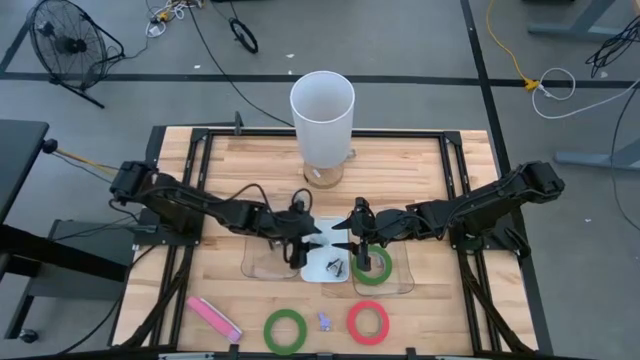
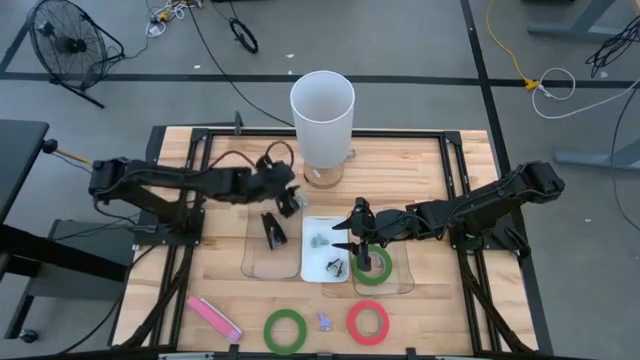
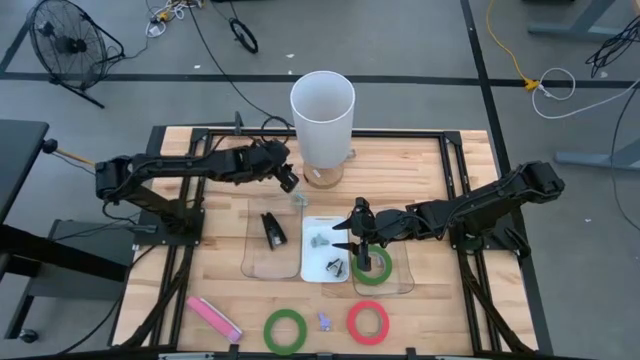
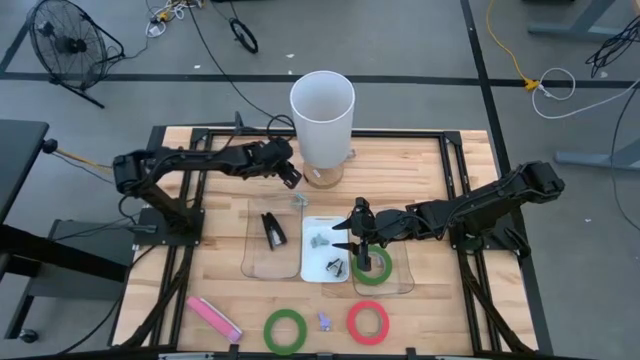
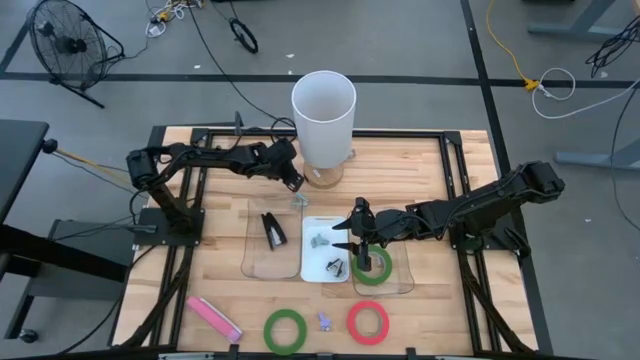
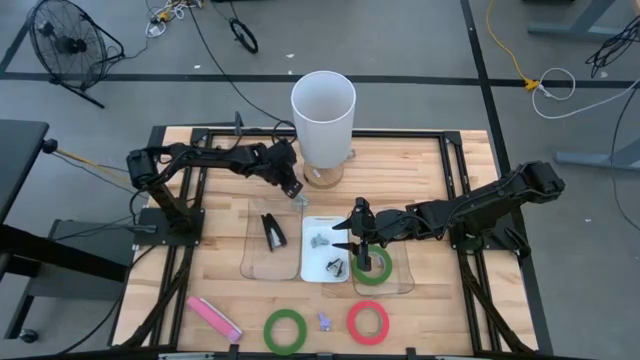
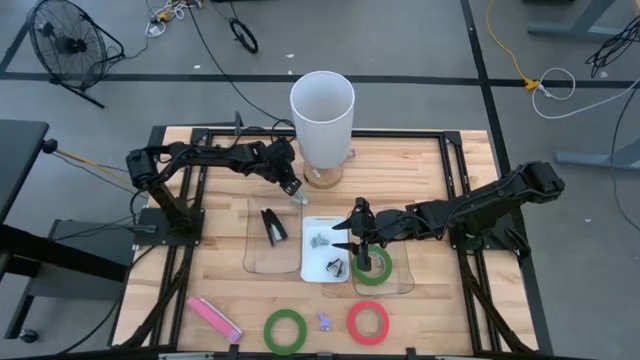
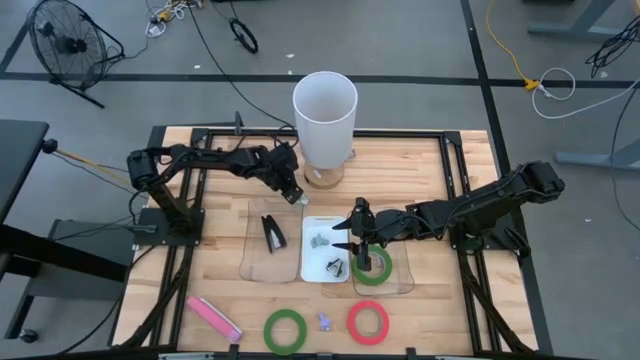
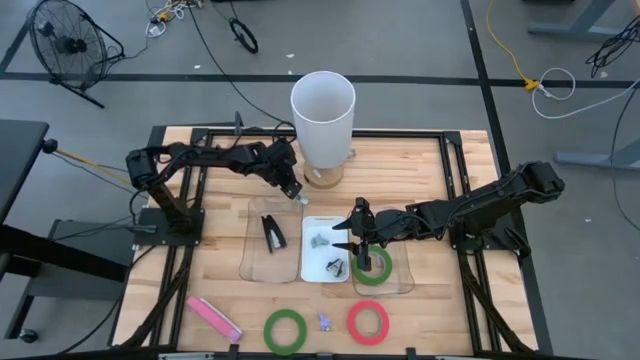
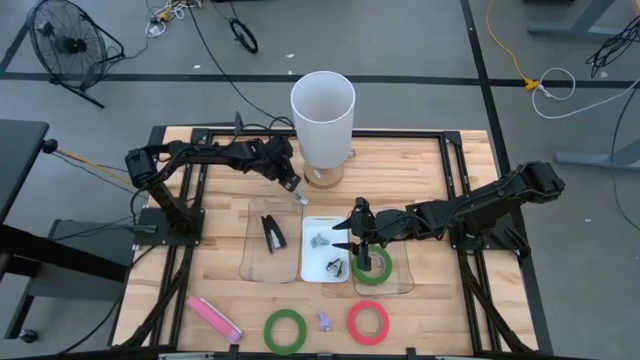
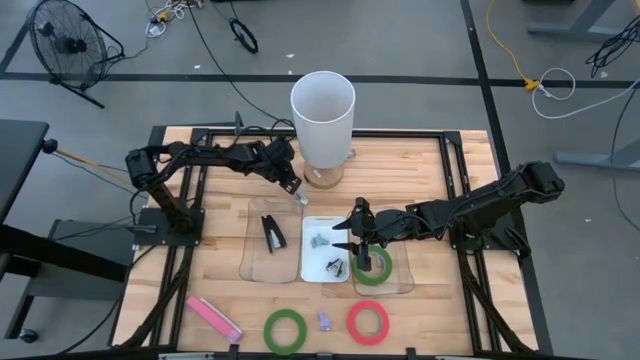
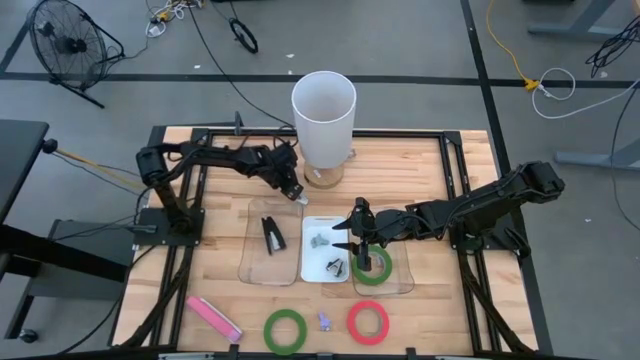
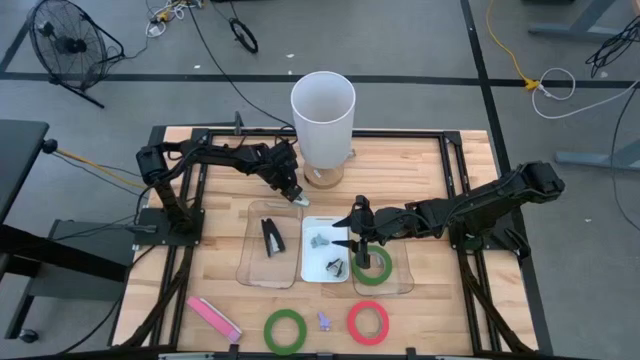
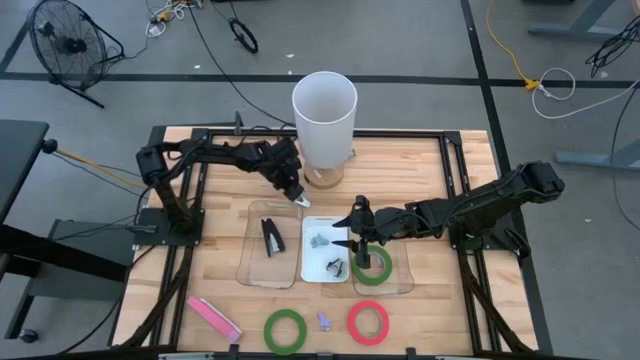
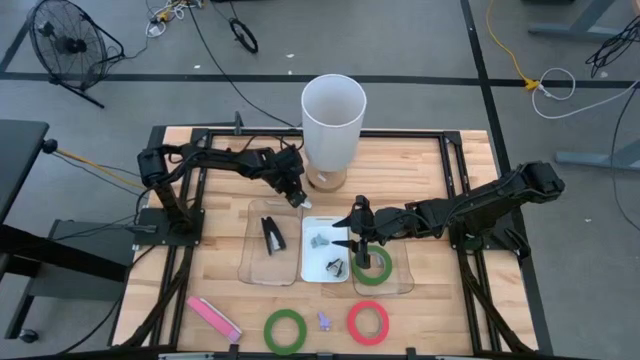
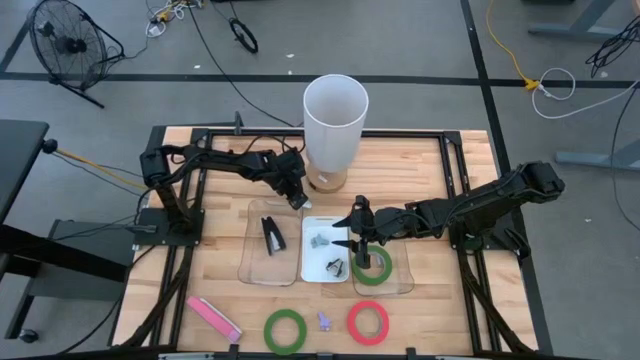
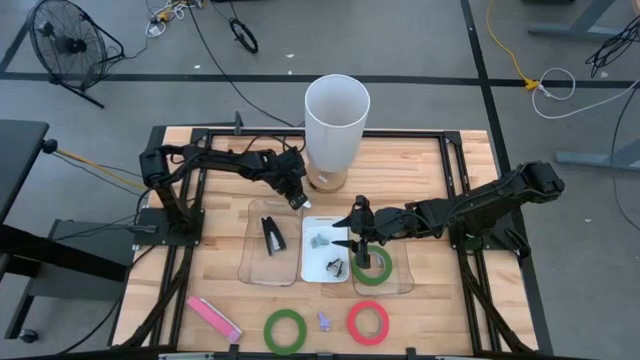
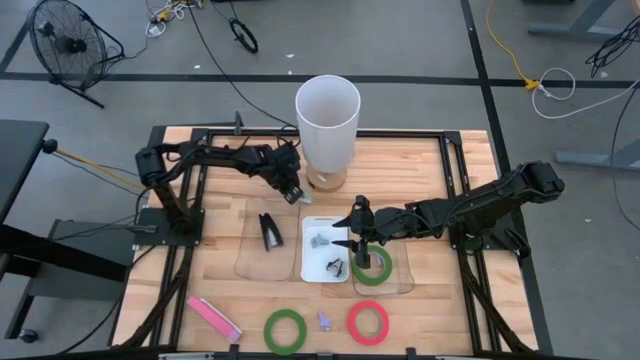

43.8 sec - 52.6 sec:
Task: Pick and place Stapler, Stapler remover, tape
Put the light blue staple remover into the white bin

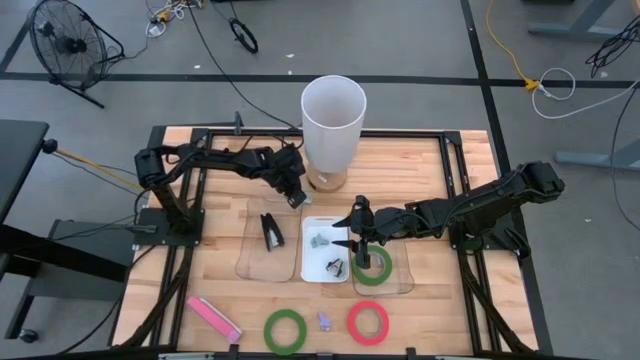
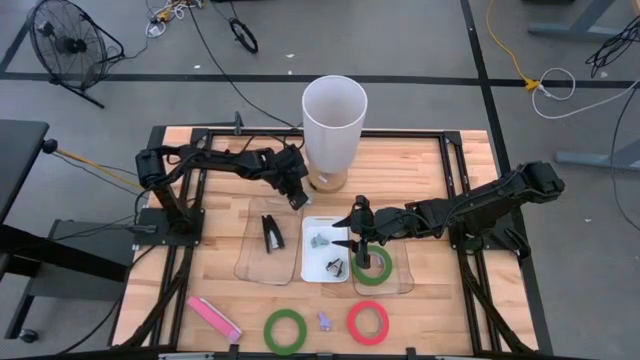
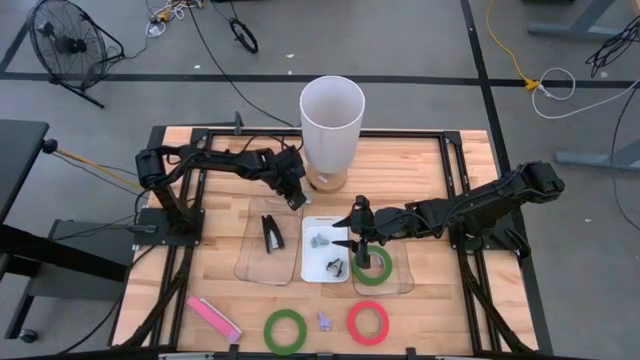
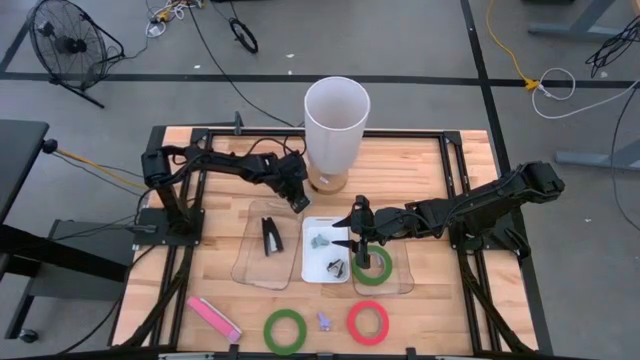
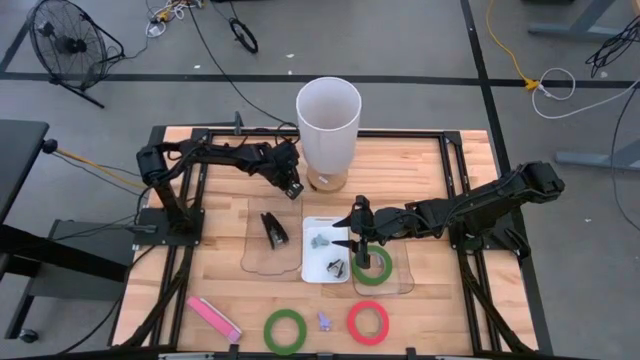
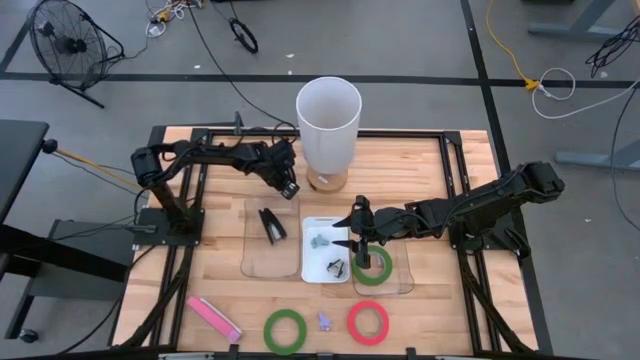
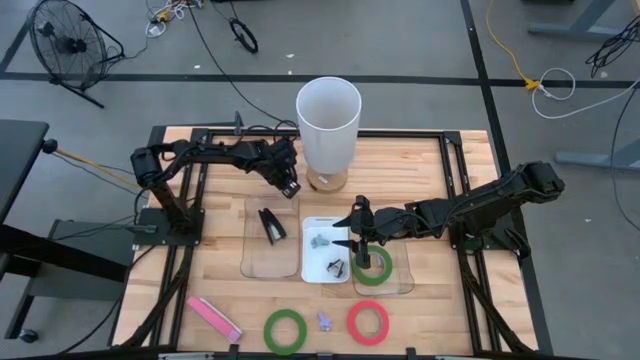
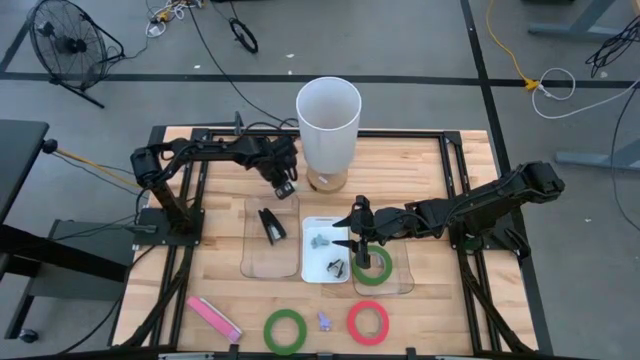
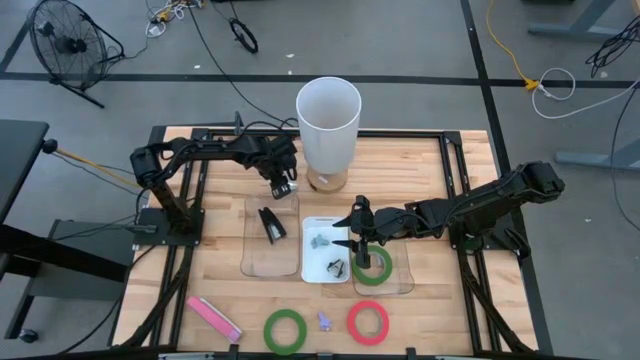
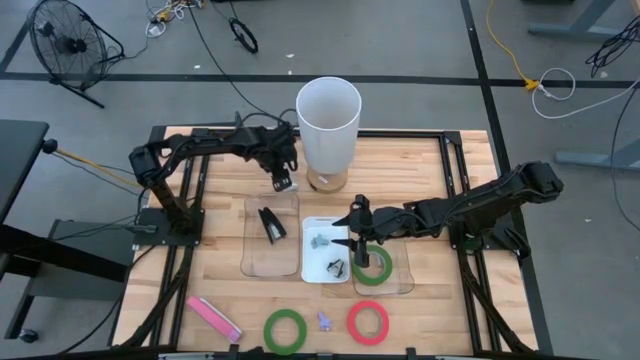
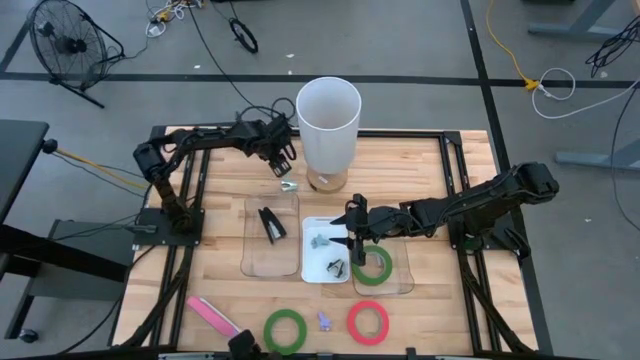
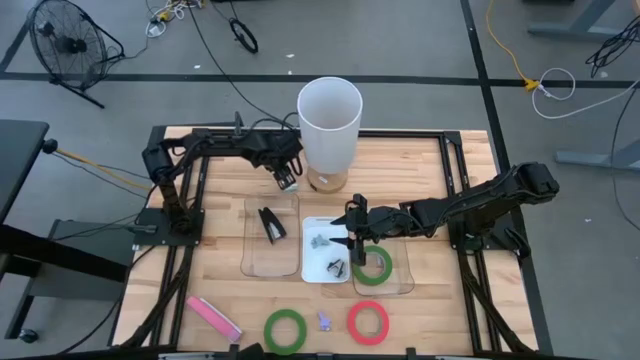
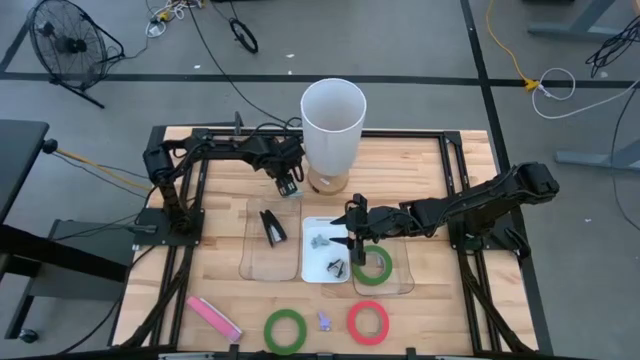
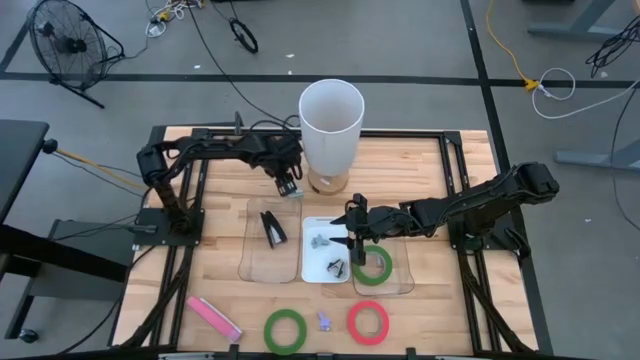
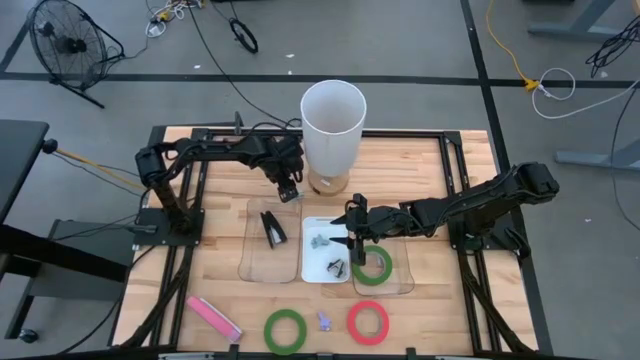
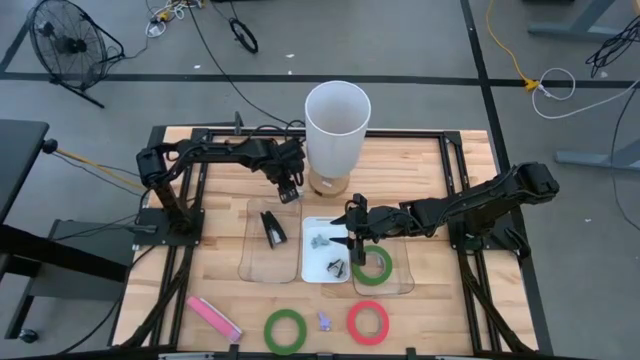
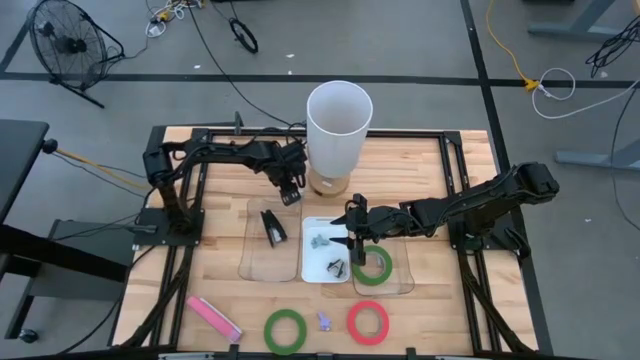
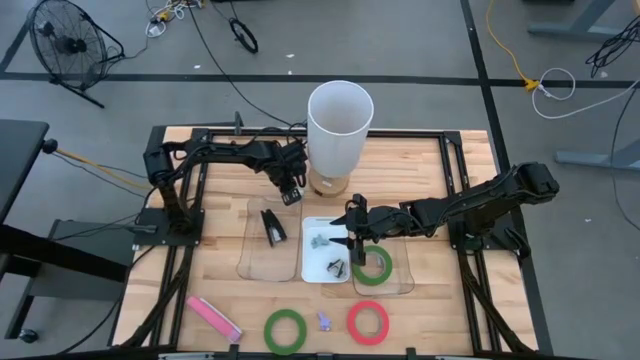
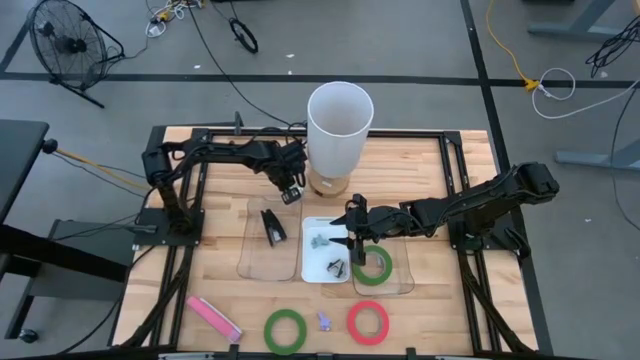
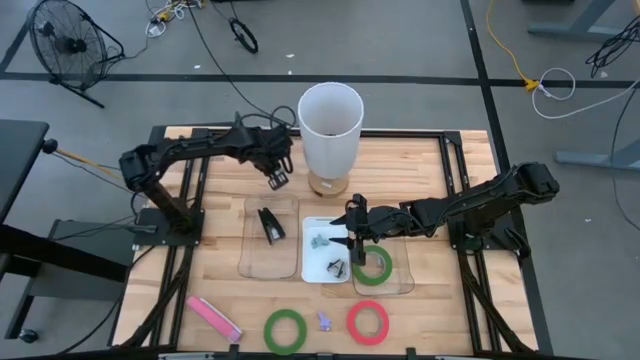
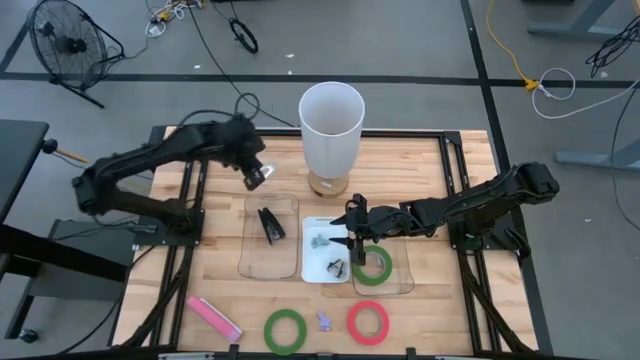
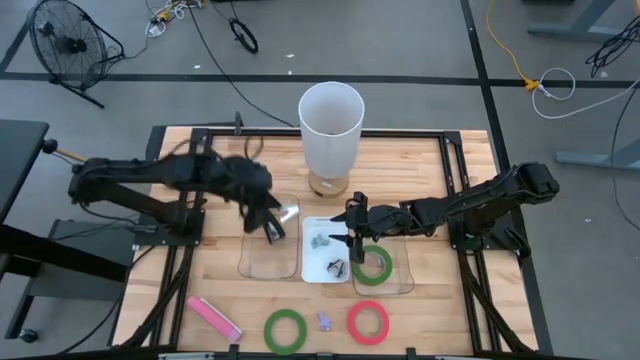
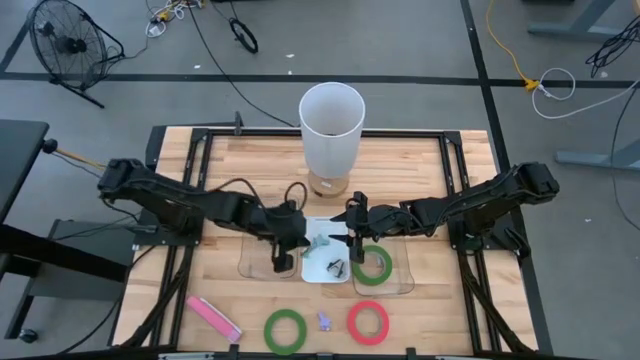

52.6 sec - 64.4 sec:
Put the light blue staple remover into the white bin

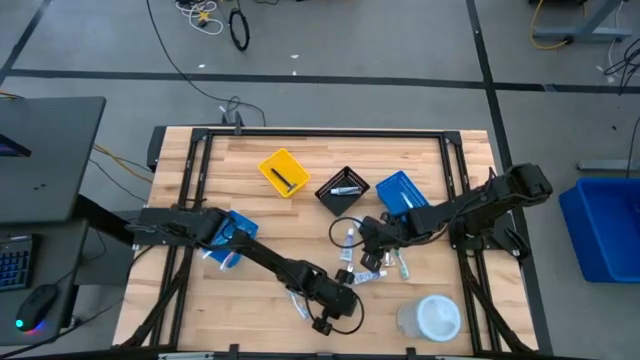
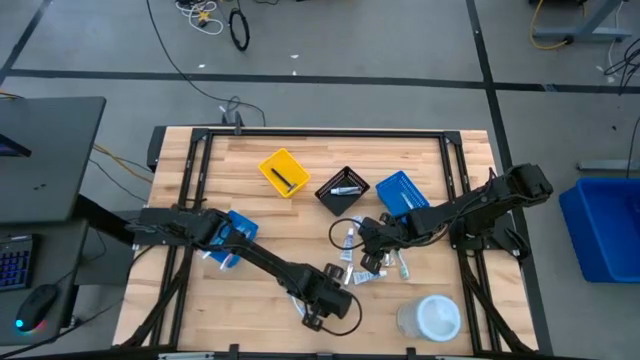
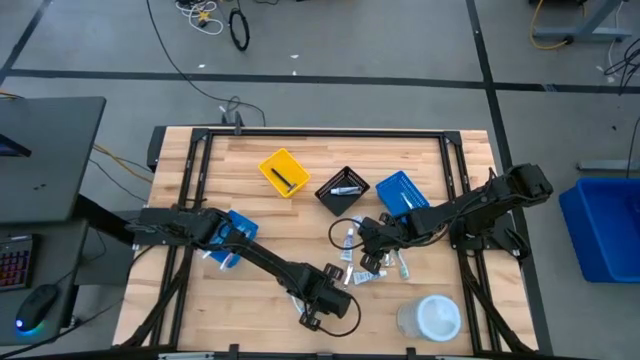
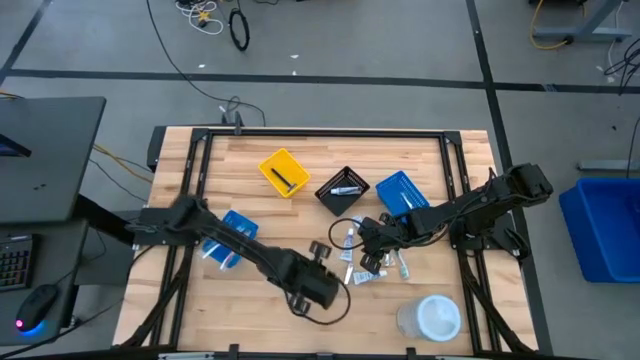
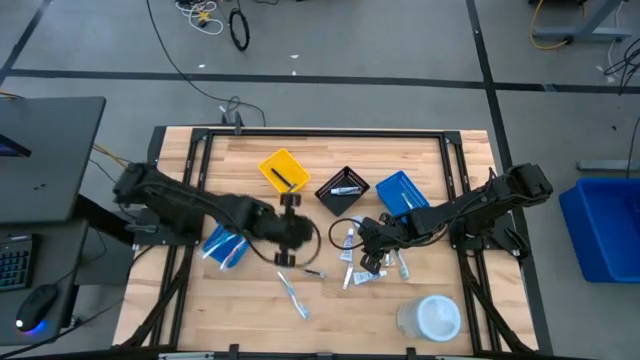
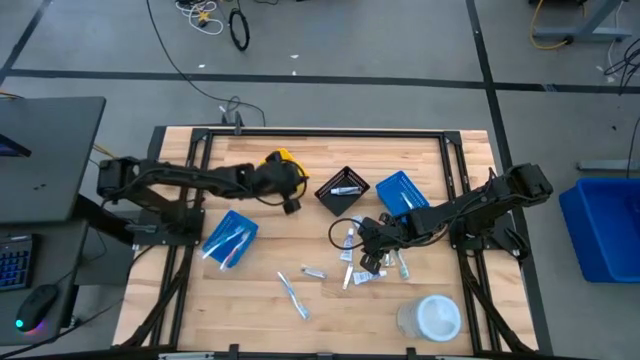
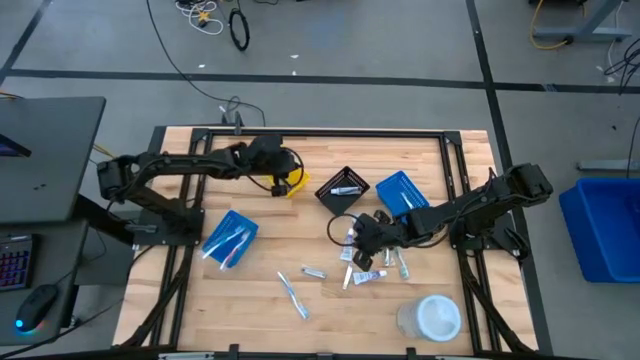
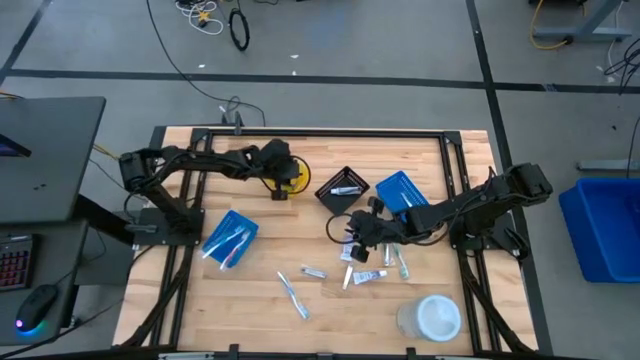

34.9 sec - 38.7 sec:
Task: Pick & Place Travel size toiletries
Put the blue razor into the yellow bin
